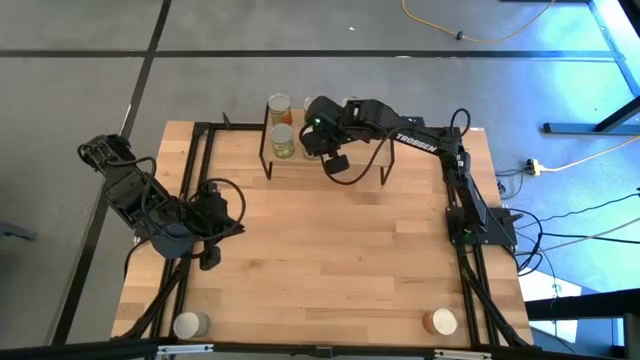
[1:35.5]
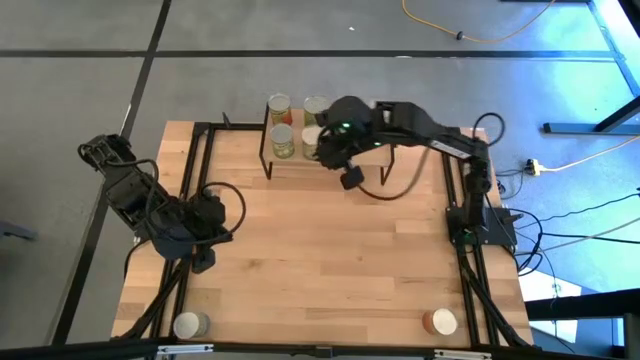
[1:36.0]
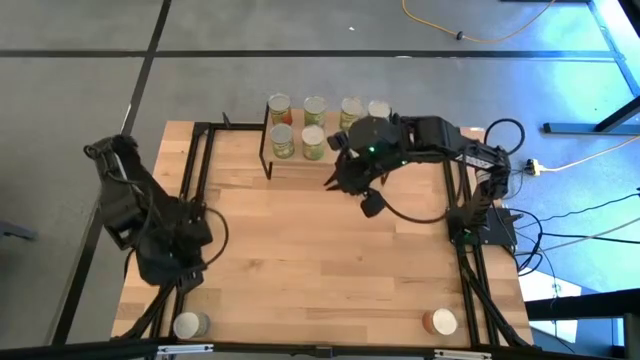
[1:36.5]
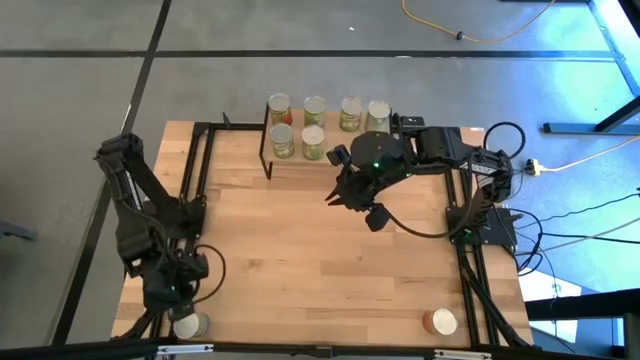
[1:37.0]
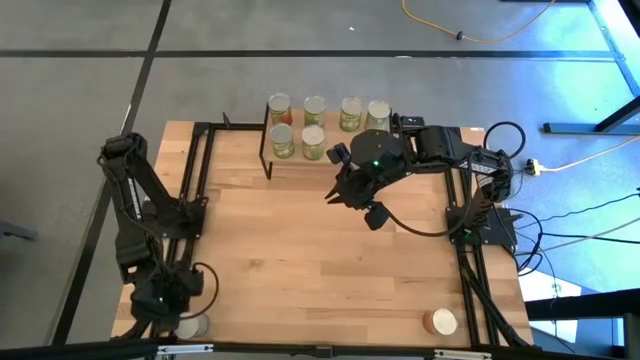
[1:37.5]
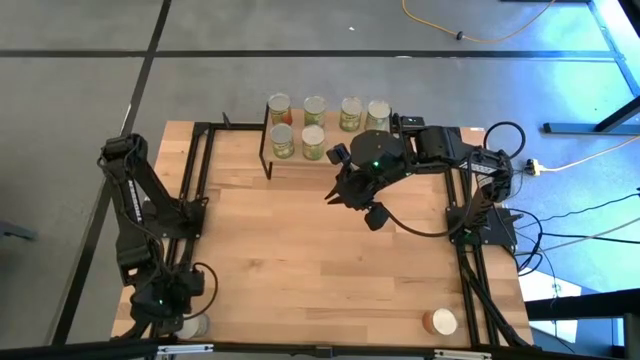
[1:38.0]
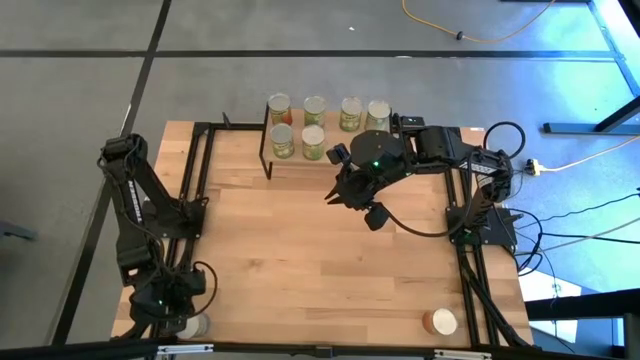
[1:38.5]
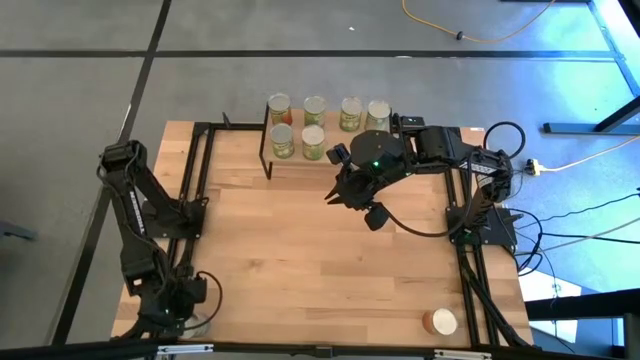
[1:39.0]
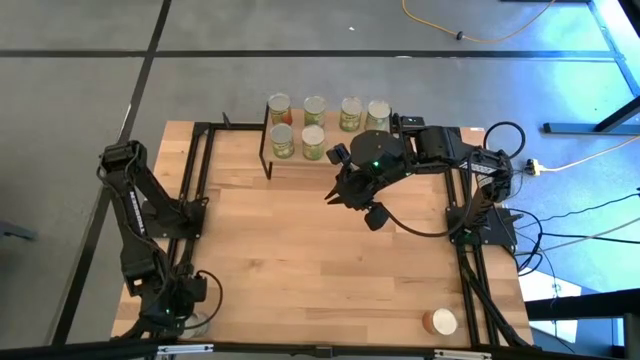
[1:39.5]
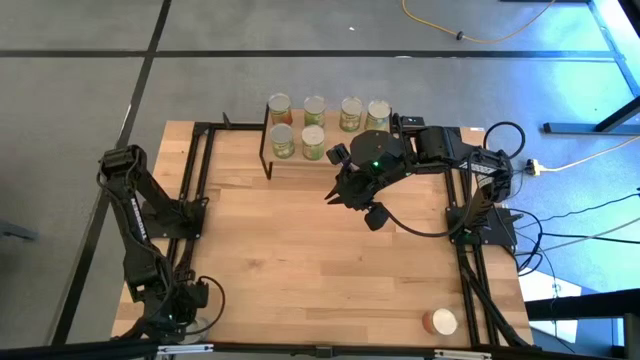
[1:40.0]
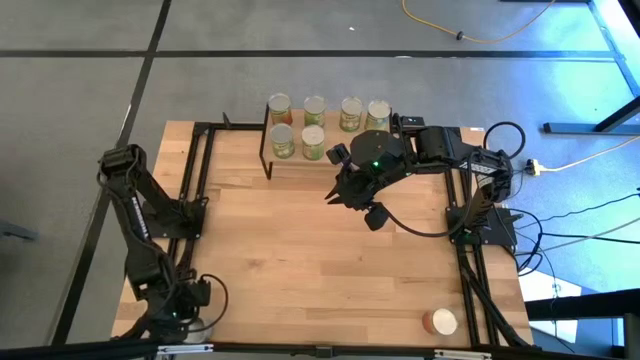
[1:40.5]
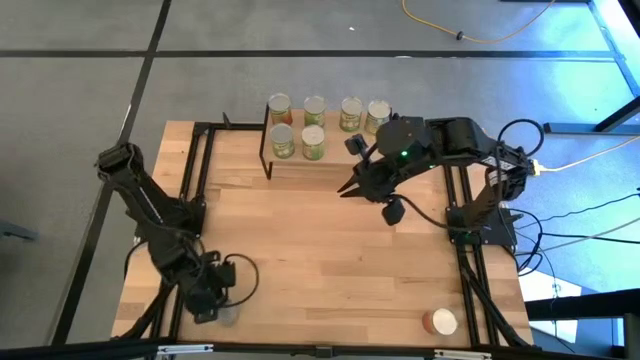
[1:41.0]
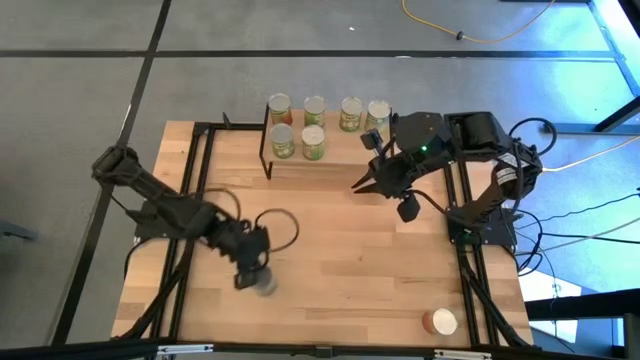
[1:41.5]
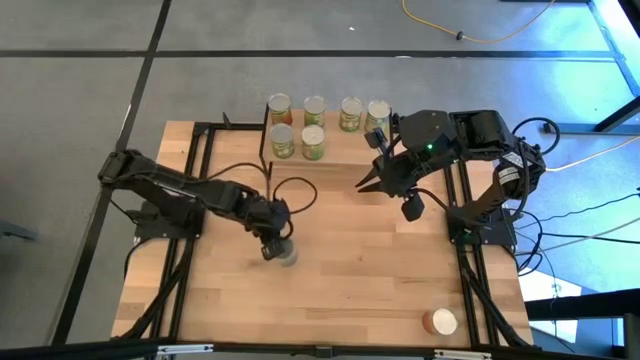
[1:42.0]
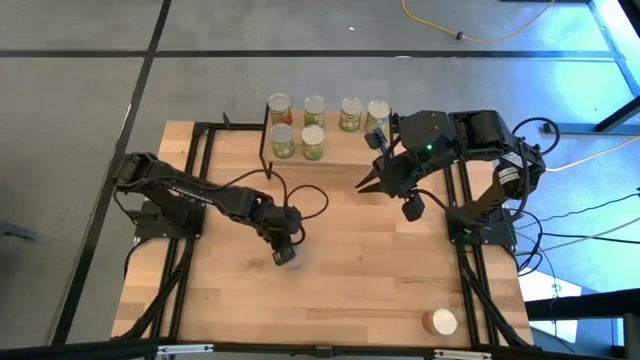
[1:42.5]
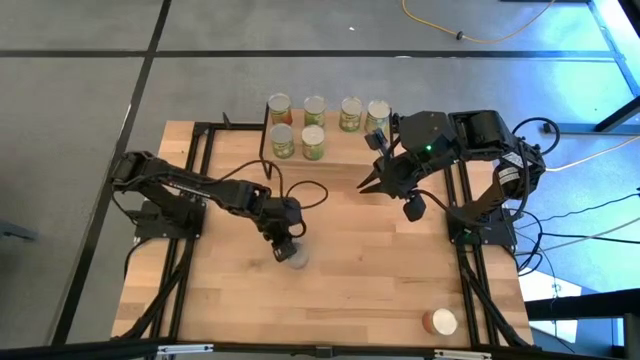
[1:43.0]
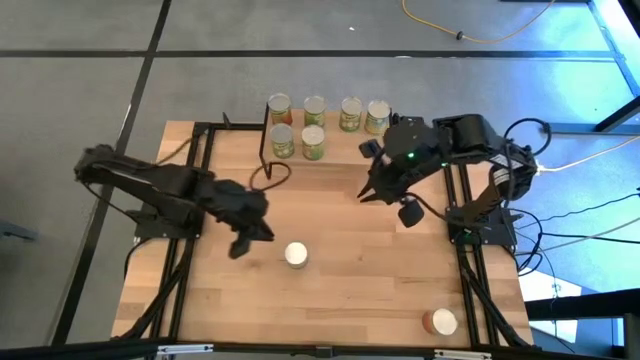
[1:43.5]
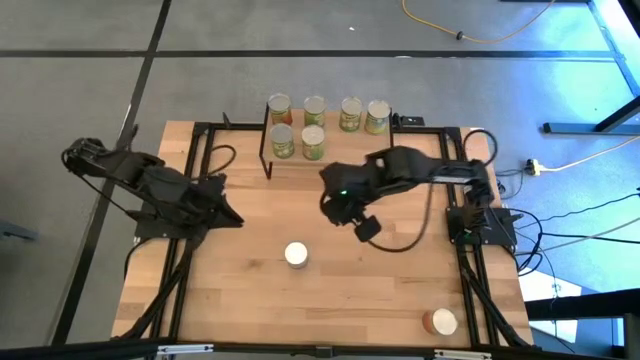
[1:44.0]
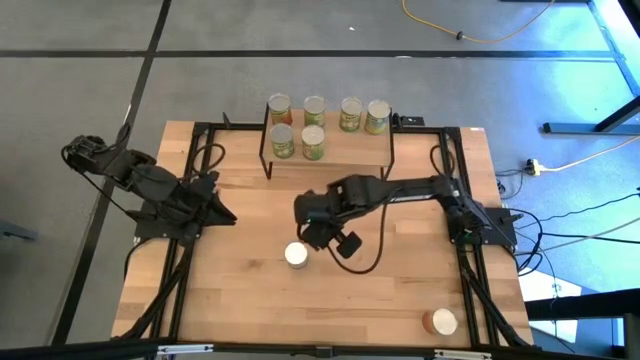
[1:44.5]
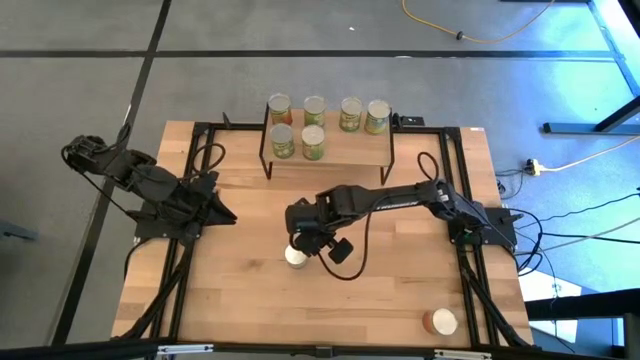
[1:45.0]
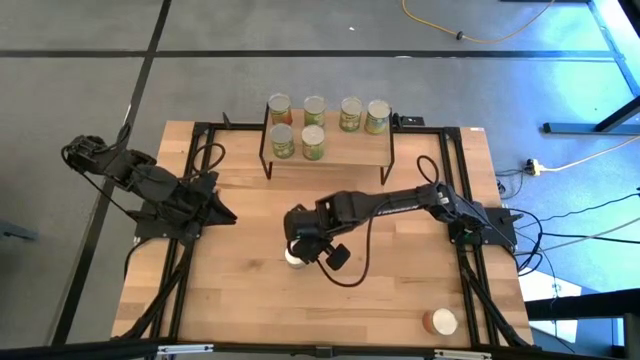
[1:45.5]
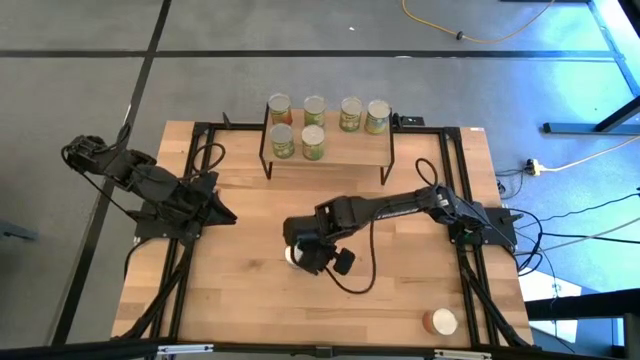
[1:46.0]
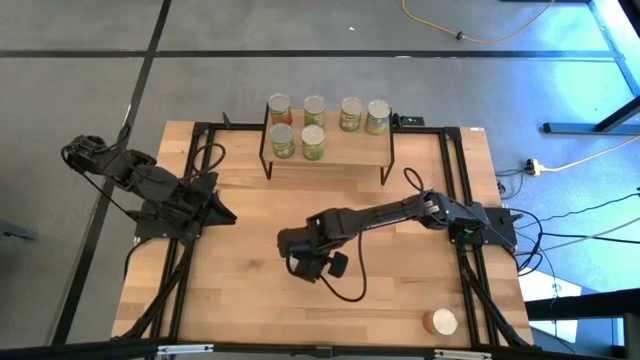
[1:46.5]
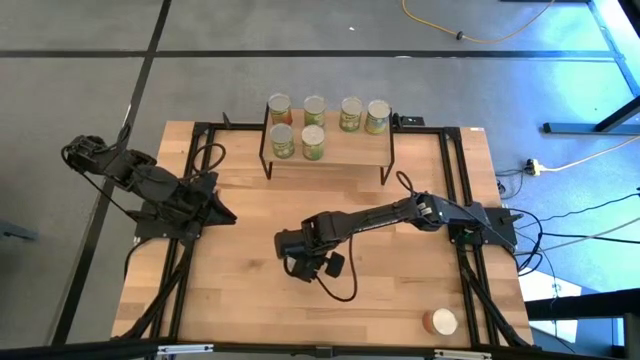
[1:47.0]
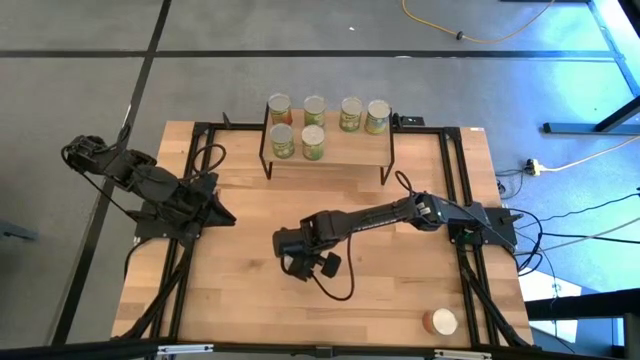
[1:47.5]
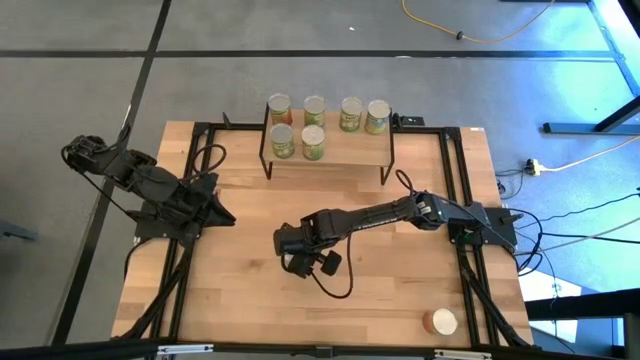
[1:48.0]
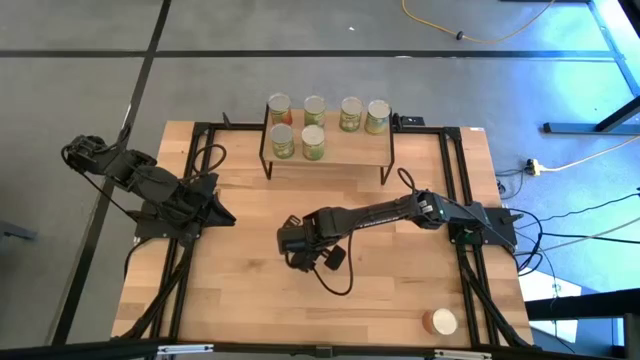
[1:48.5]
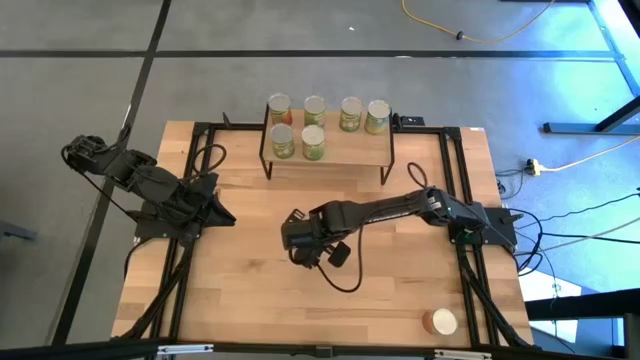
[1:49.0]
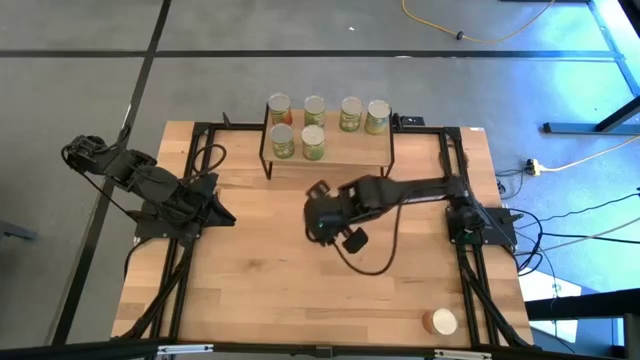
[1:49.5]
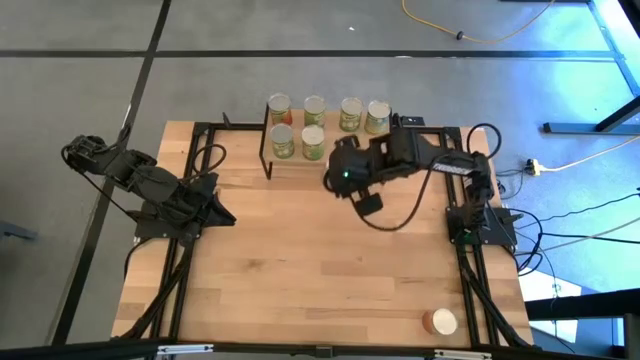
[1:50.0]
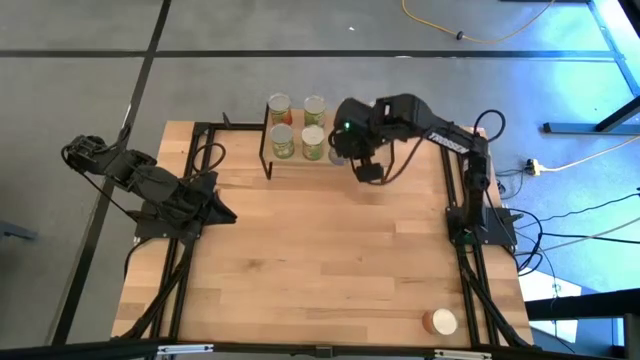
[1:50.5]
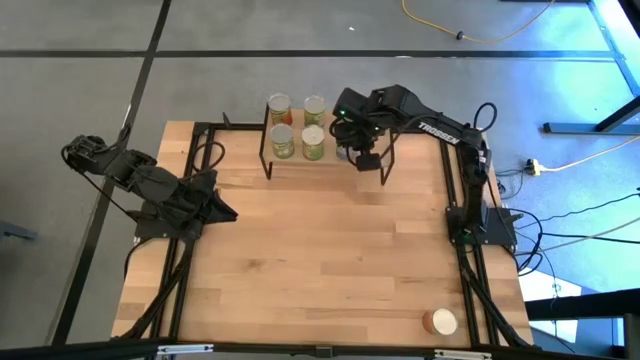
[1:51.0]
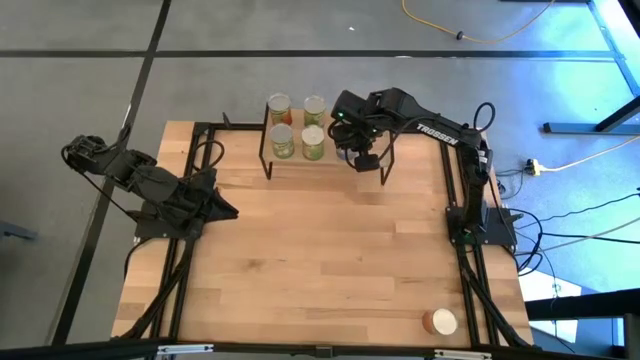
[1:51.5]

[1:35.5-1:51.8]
Task: Pick and place cans onto a shelf
Put the canned peas on the shelf

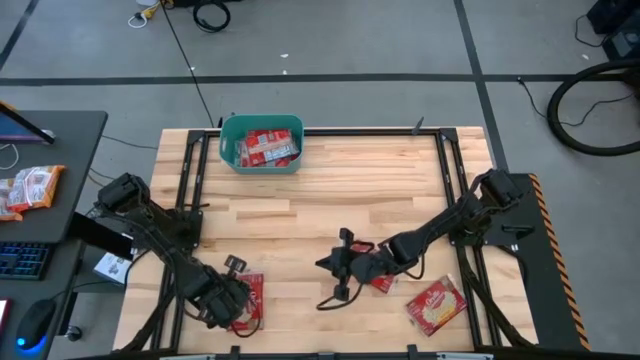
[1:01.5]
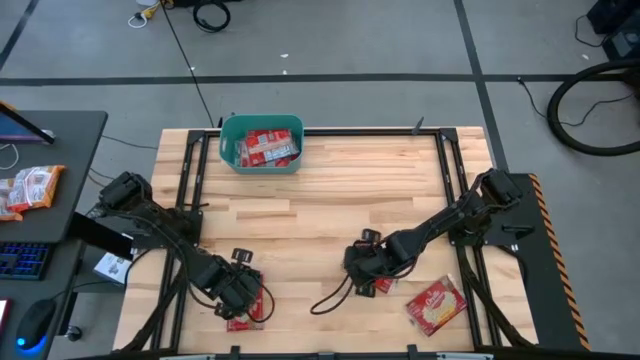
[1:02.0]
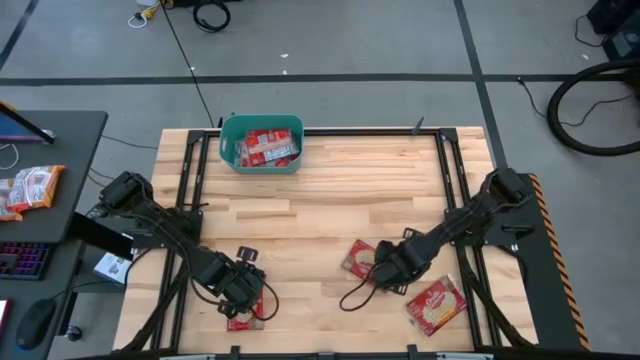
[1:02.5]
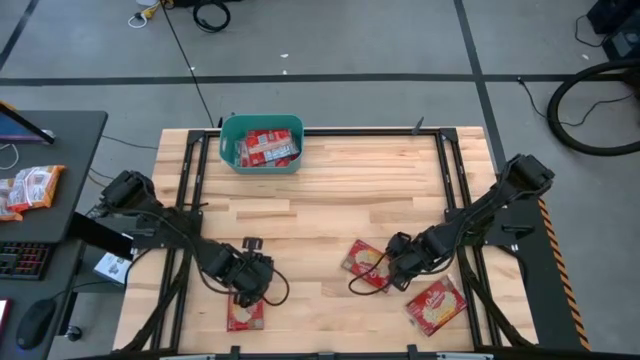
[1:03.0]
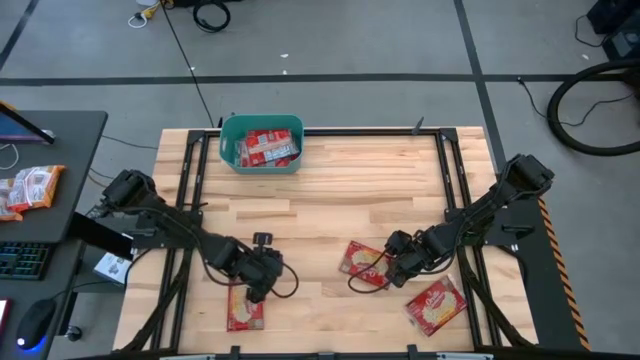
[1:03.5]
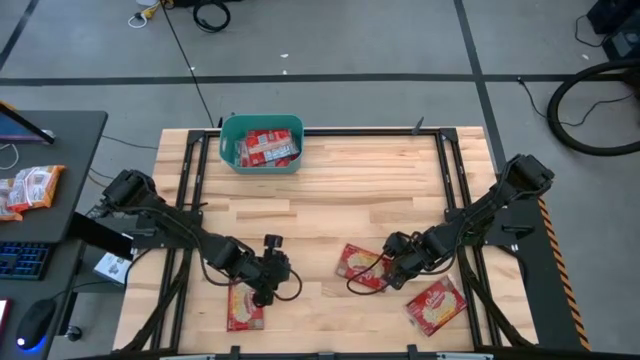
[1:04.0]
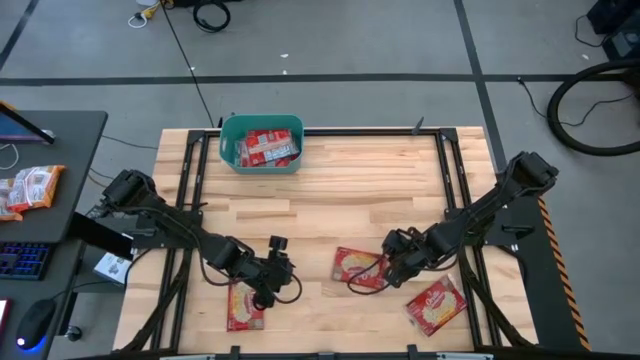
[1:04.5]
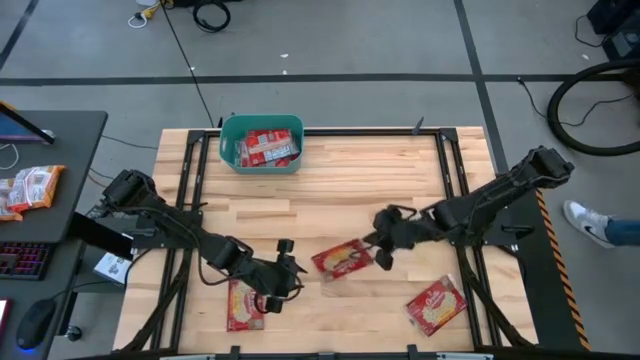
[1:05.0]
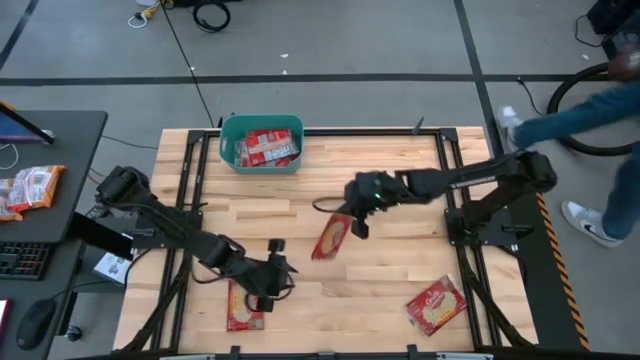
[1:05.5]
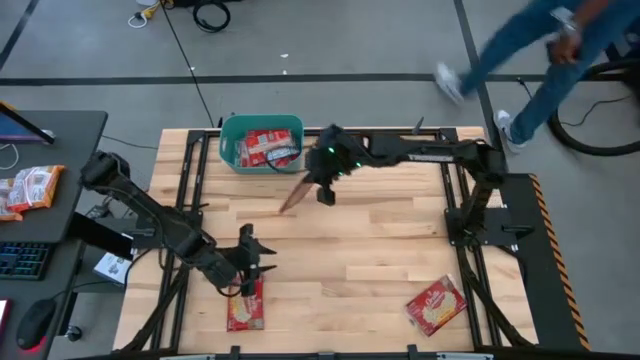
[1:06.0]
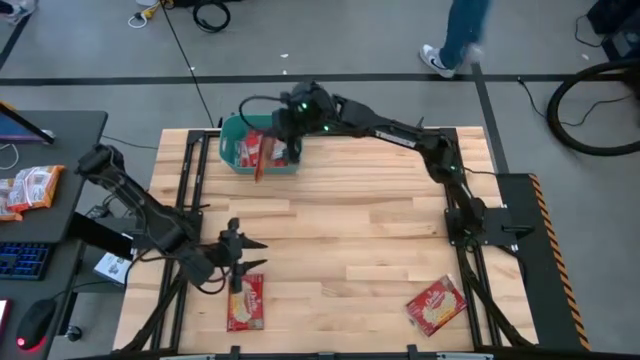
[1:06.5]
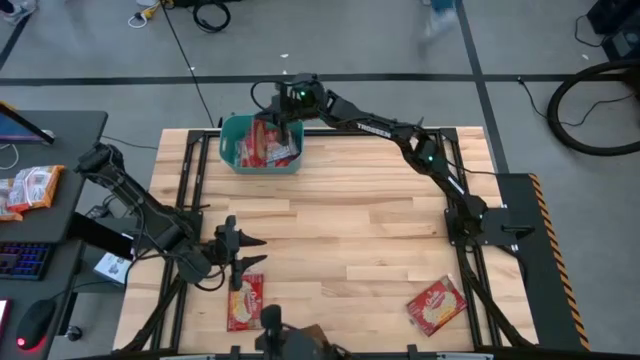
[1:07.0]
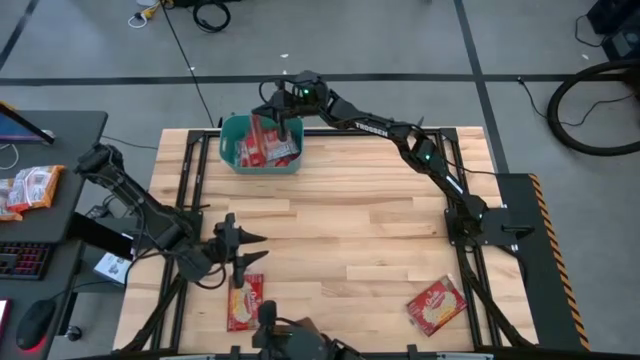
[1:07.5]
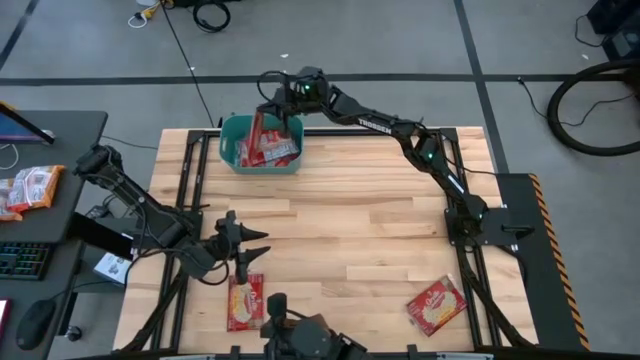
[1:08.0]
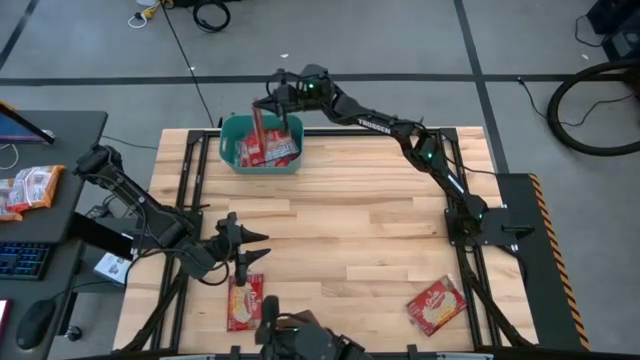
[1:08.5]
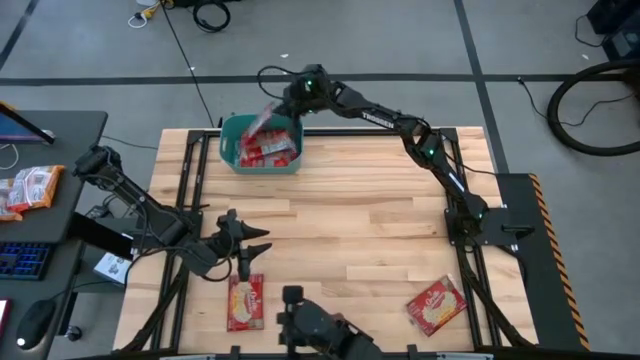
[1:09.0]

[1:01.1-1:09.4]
Task: Sort popcorn bags into baskets
Put the top popcorn bag into the blue bin
